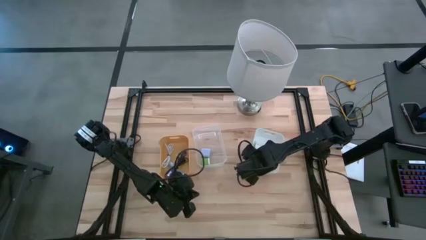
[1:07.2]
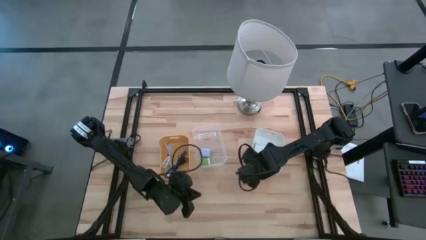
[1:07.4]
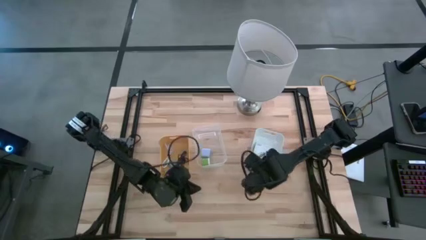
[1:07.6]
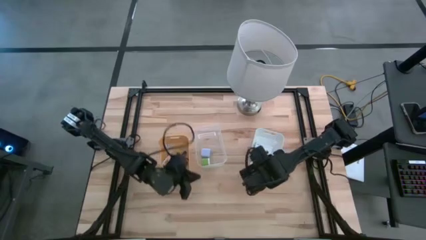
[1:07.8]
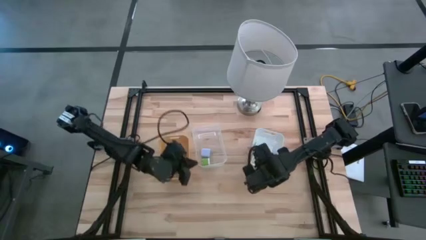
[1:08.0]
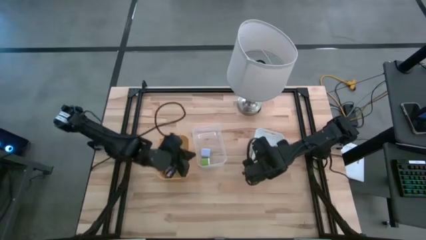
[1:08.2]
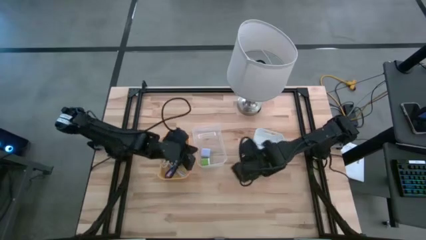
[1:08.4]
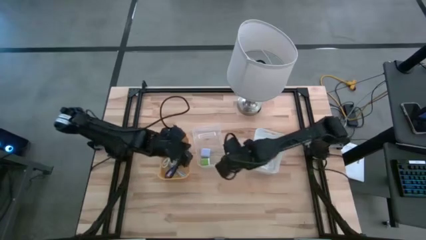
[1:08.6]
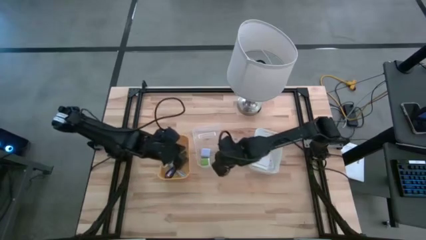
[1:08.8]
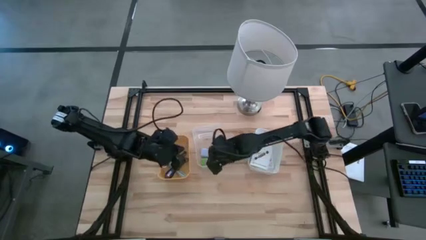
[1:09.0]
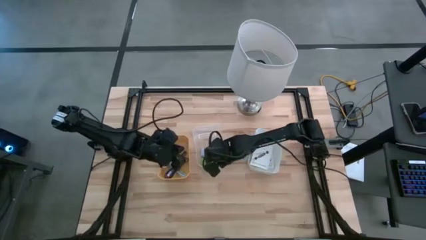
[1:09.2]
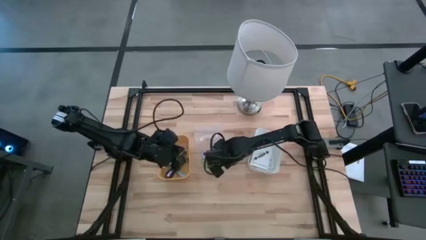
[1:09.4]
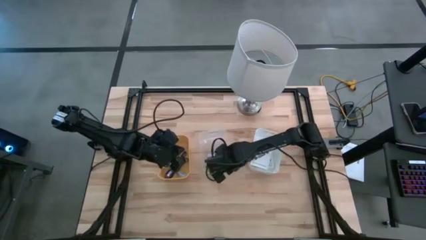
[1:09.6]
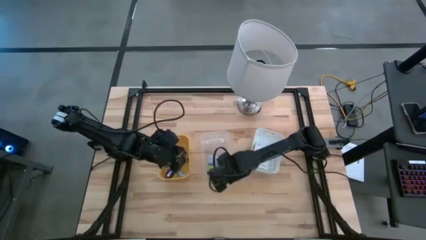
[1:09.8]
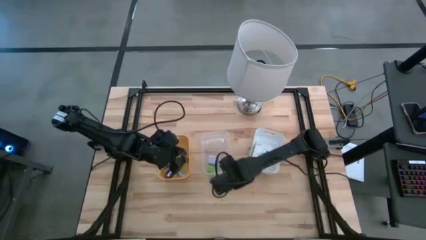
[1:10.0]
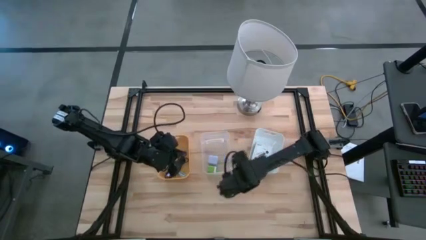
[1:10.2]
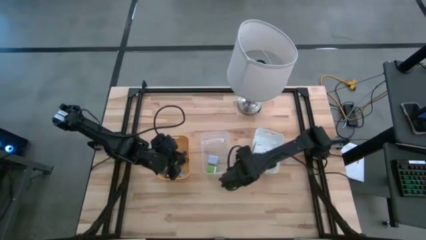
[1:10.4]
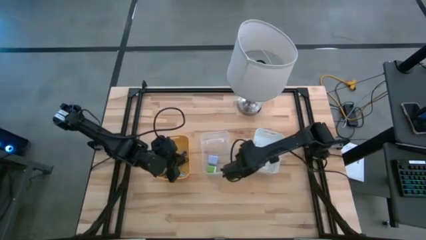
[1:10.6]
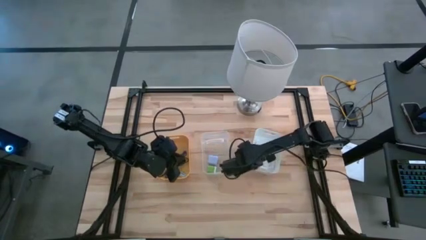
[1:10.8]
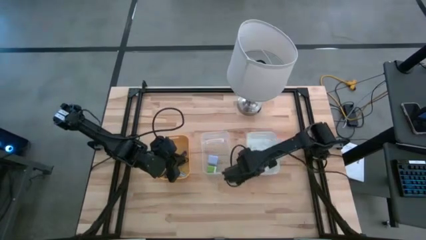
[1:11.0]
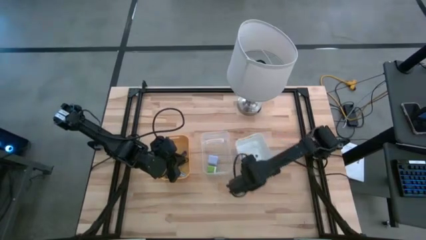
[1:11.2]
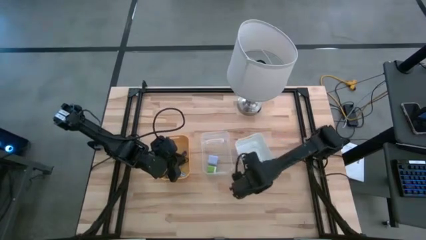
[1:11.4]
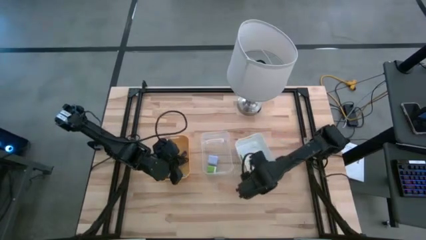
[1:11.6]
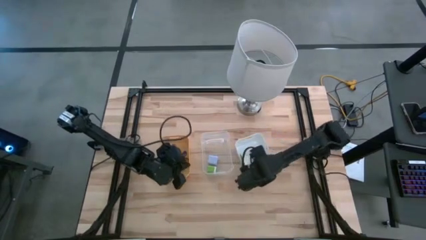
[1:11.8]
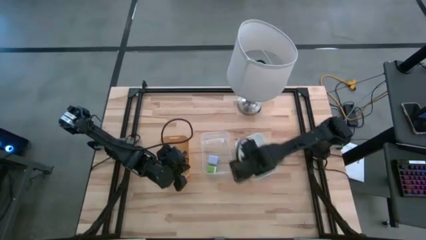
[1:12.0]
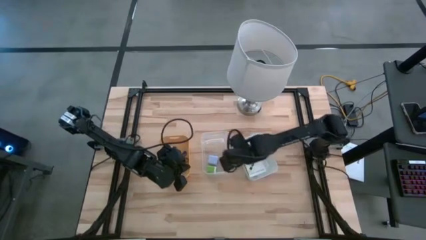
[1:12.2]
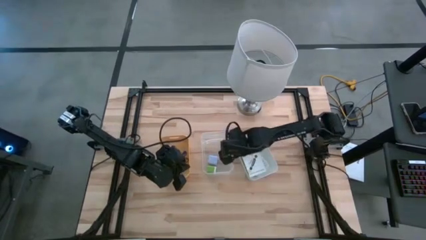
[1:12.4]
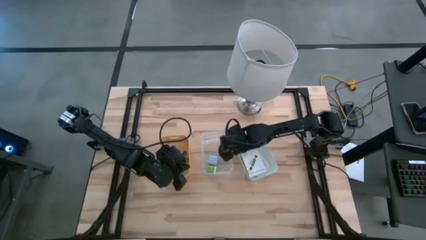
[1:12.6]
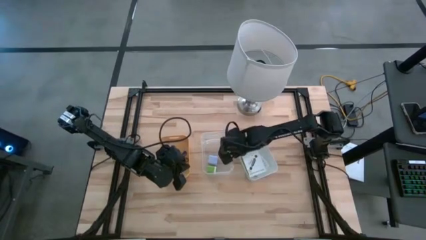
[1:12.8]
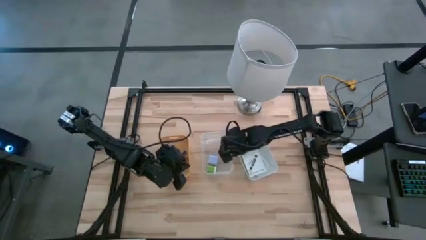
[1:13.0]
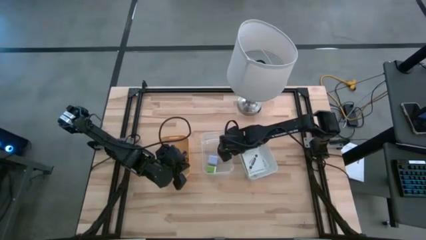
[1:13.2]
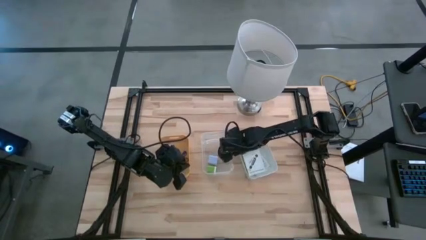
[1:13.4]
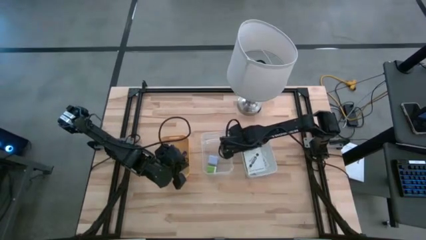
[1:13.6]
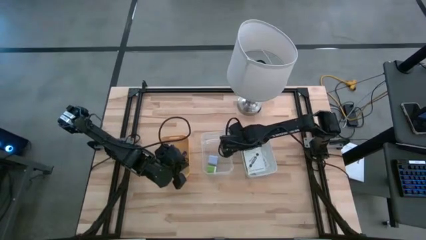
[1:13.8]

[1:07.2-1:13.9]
Task: Pick and place items into bin
Adjust the bins

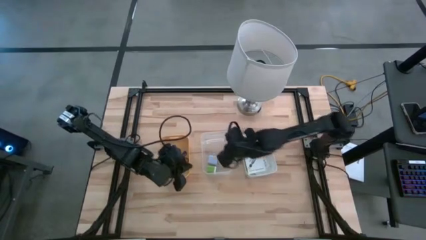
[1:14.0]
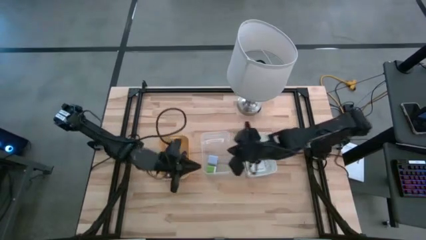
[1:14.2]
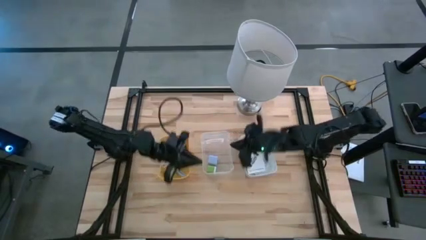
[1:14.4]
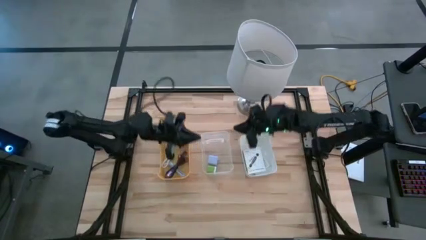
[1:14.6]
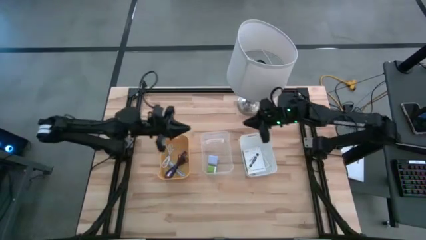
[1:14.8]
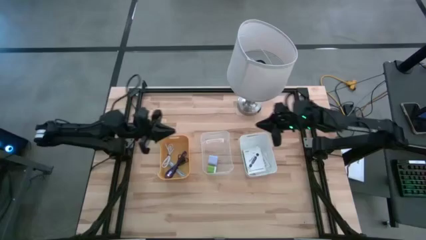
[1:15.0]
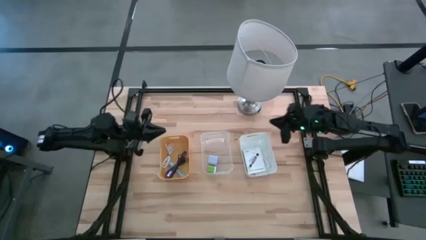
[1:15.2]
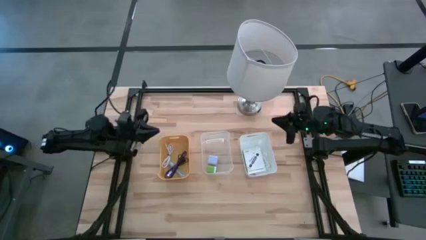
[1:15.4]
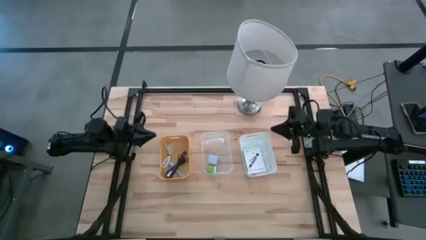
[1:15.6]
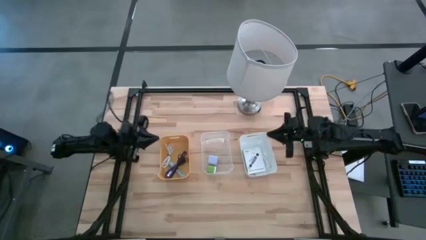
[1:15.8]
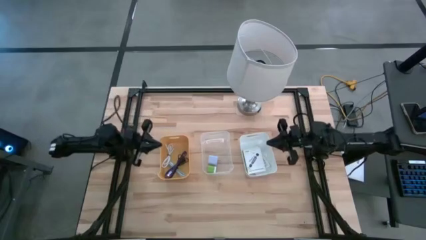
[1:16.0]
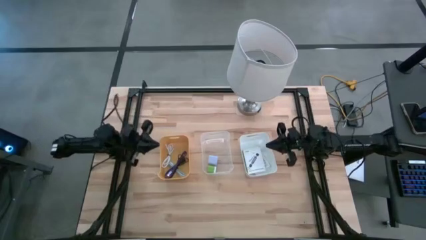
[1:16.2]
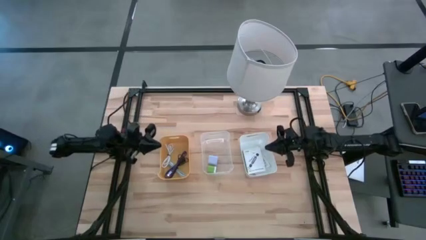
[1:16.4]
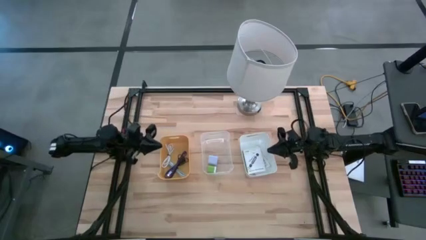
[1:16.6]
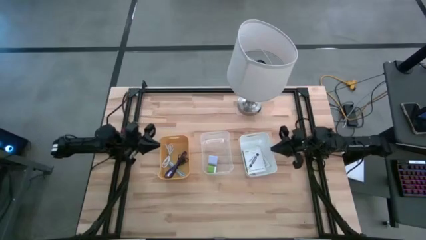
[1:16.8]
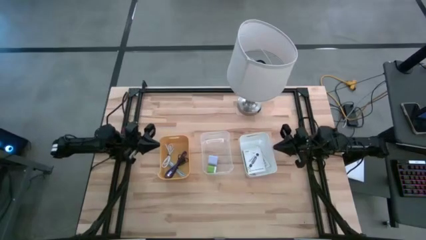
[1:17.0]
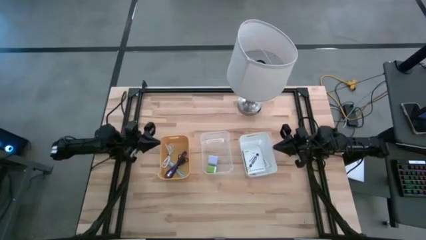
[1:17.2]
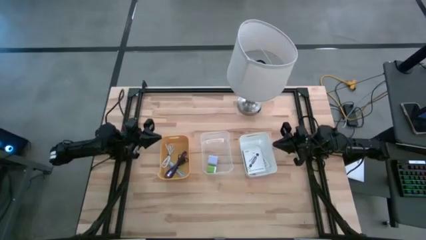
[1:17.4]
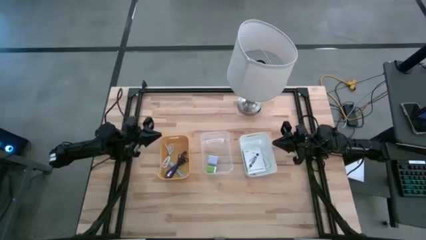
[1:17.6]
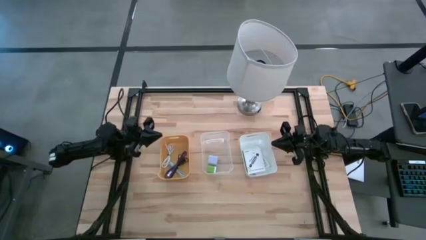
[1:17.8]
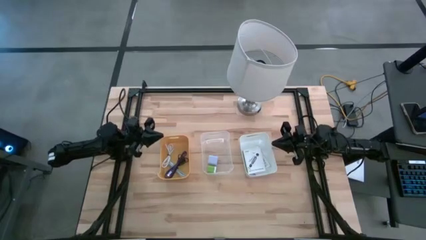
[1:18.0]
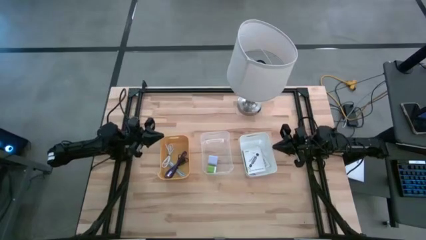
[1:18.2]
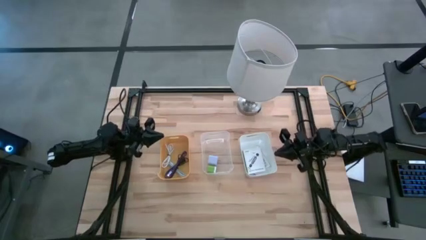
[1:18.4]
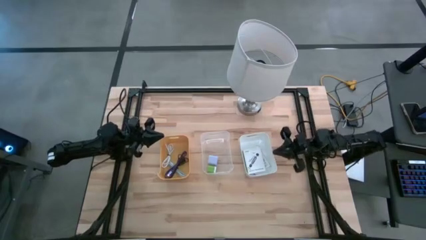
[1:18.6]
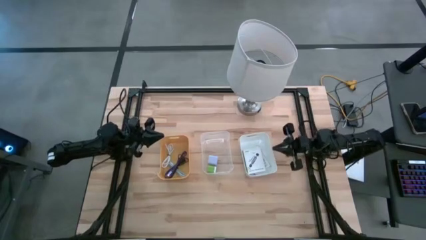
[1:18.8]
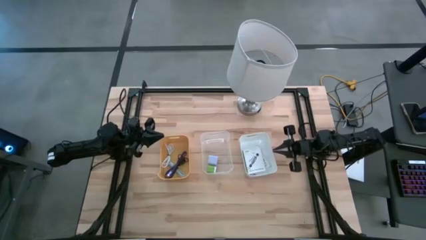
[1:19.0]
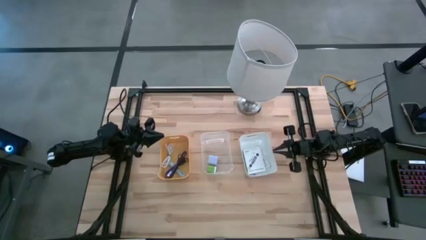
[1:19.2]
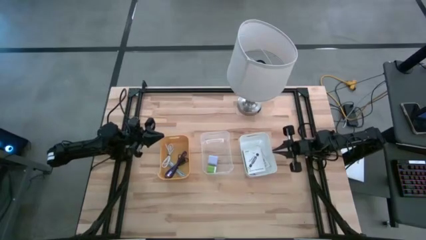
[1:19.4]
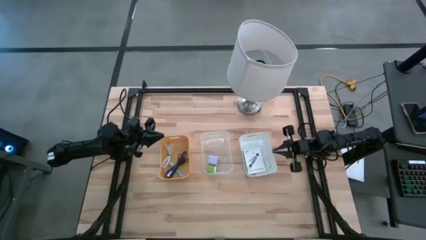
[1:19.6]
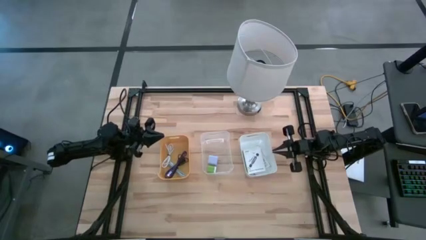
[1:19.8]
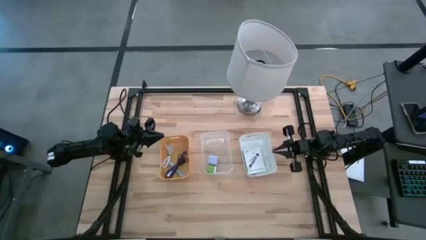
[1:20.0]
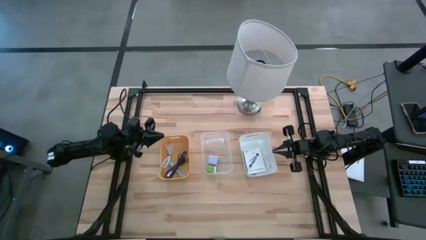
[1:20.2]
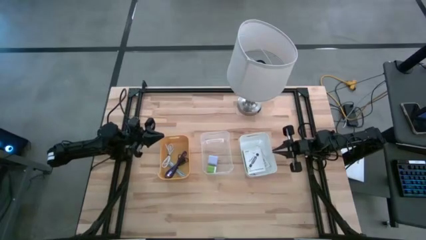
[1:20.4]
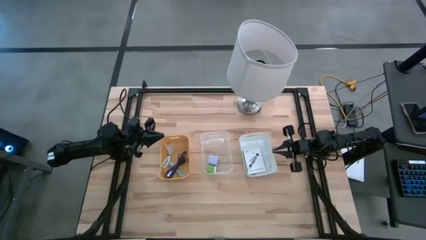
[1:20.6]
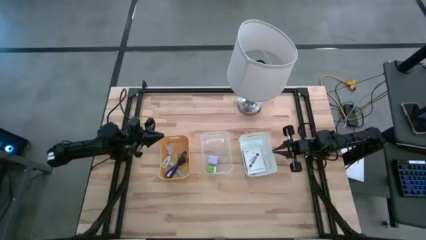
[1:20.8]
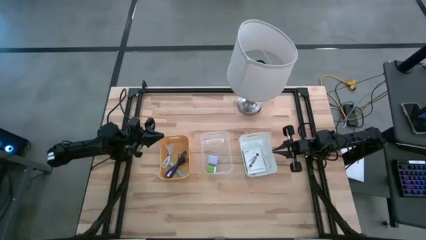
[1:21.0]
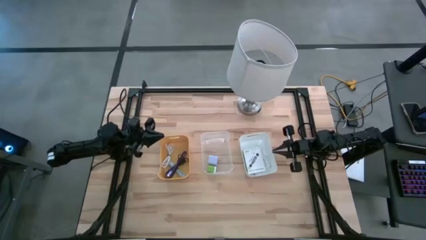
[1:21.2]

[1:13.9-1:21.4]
Return to Home Position

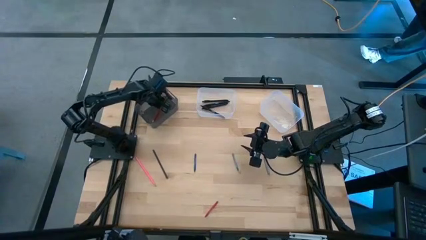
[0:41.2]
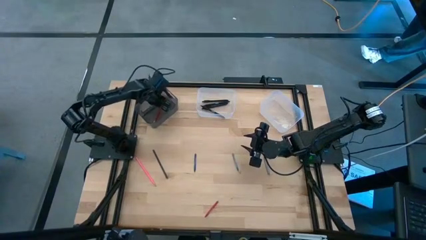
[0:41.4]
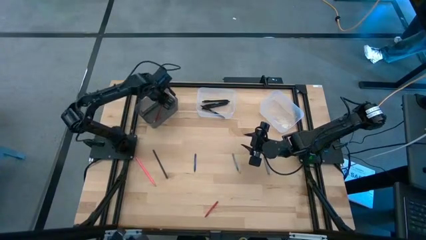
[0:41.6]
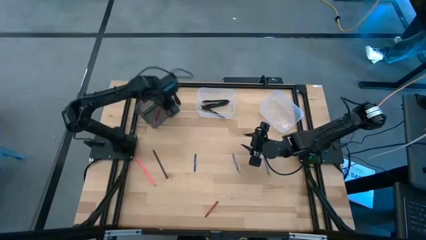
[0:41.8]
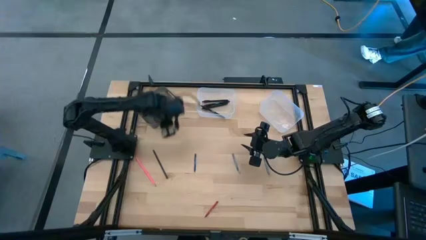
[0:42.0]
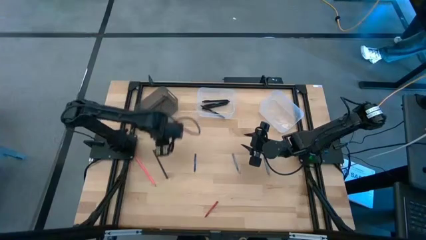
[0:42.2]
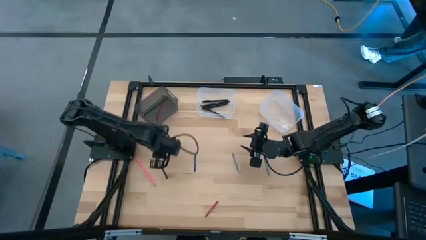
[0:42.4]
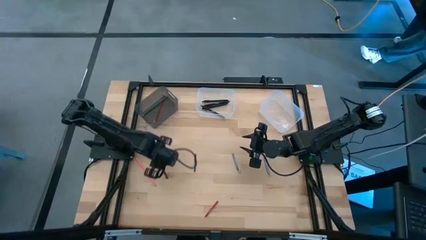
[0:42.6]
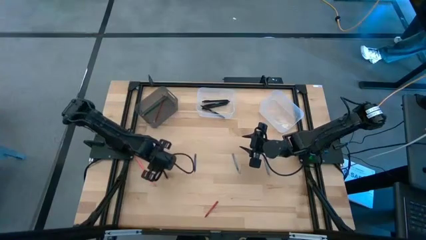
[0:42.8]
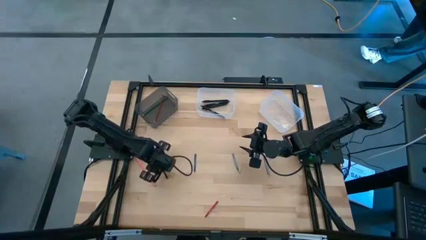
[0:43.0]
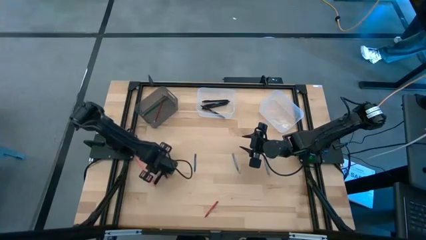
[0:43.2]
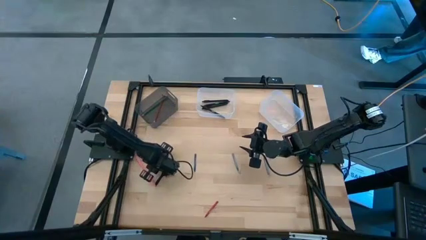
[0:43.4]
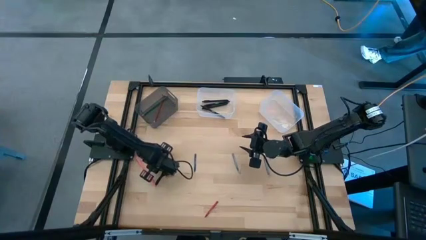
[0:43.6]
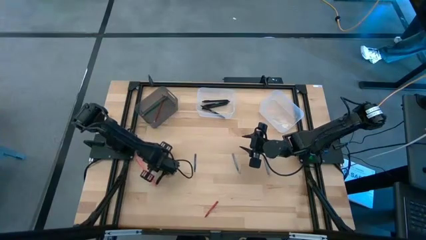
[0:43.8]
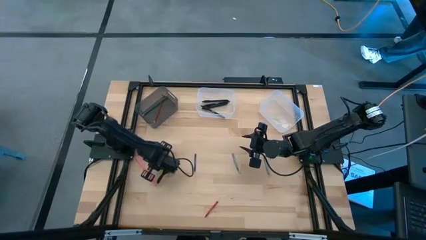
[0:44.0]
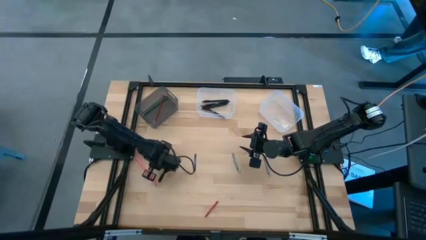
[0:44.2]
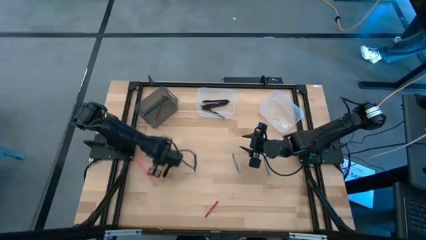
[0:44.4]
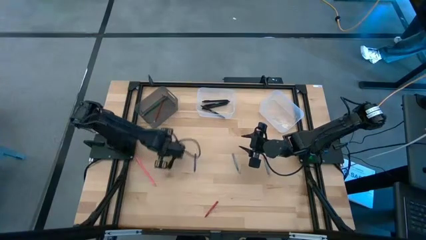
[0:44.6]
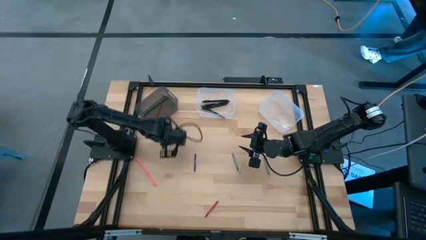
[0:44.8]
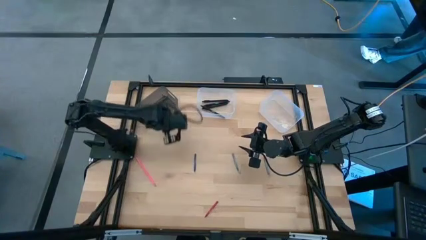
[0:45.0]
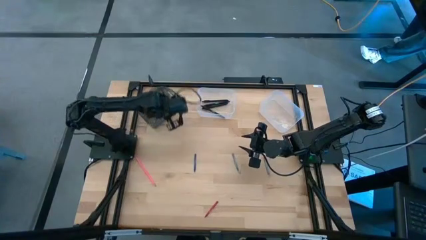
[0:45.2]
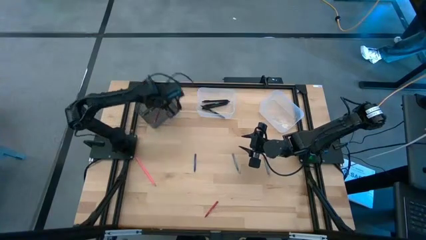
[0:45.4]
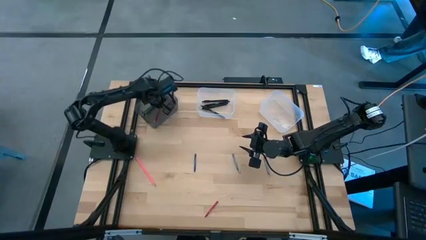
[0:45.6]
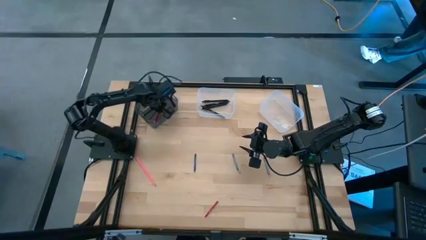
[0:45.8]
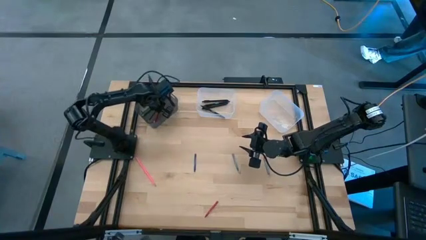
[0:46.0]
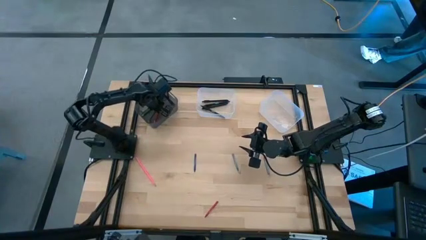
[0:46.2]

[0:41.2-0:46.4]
Task: Sort crayons/erasers/pens/pencils in bins
Put the blue pencil into the black bin
